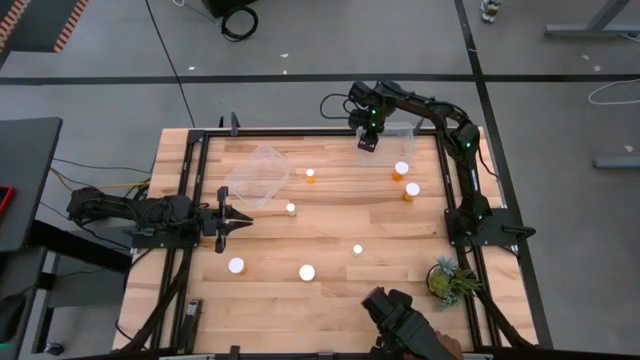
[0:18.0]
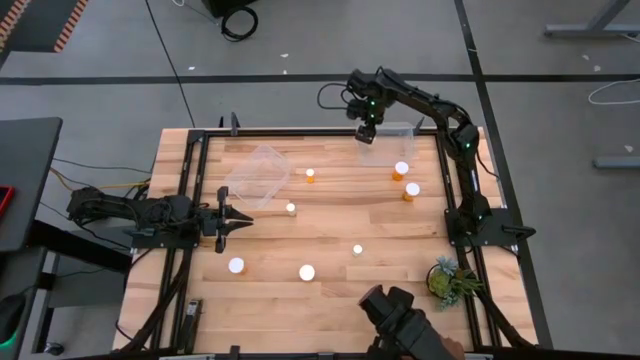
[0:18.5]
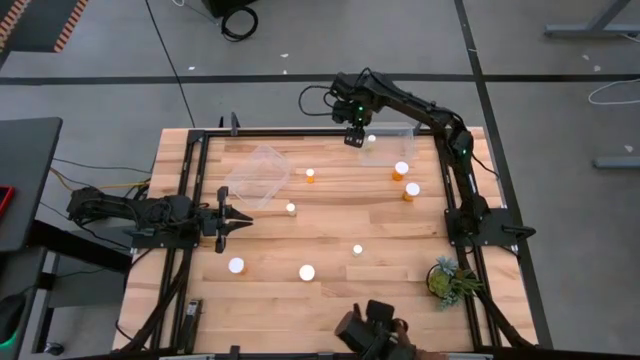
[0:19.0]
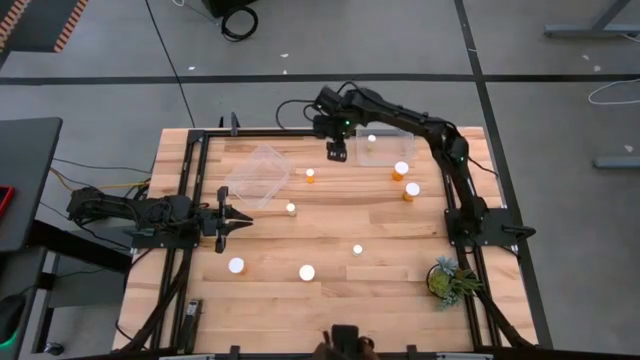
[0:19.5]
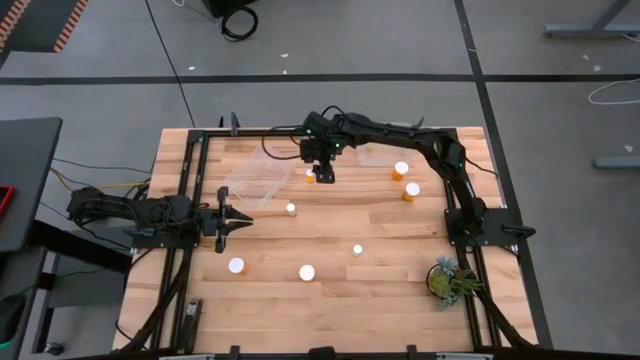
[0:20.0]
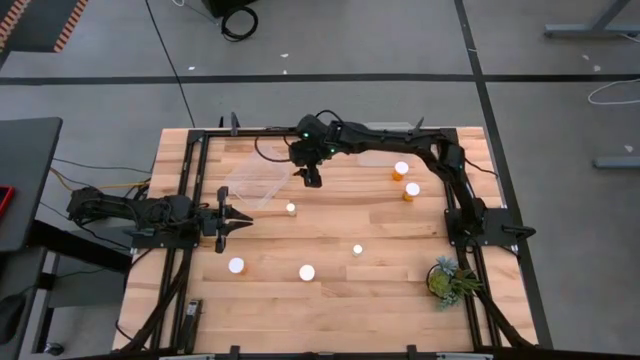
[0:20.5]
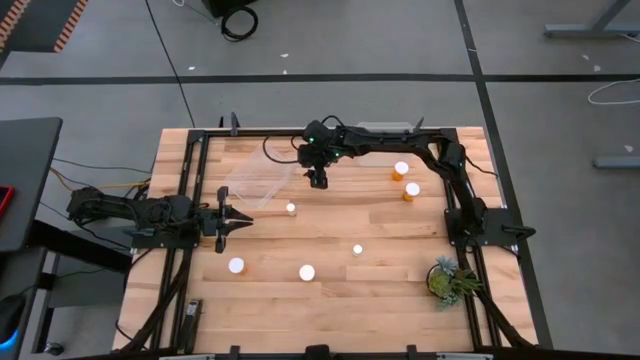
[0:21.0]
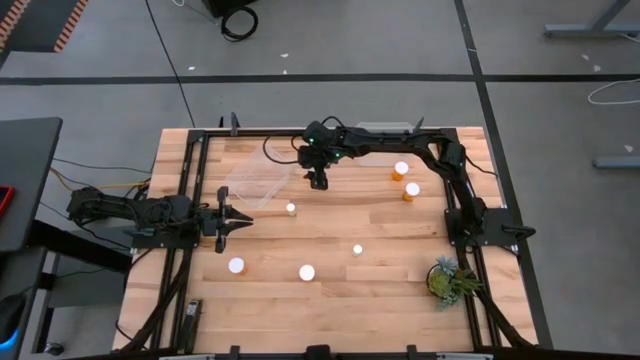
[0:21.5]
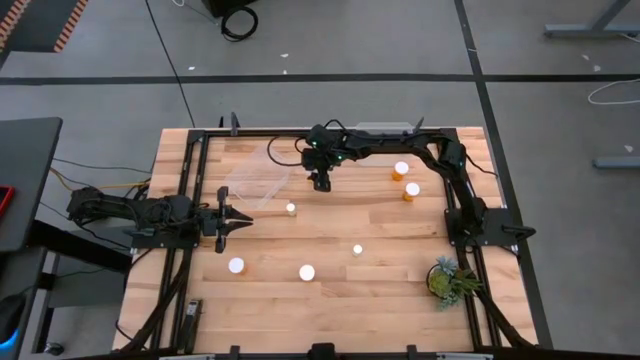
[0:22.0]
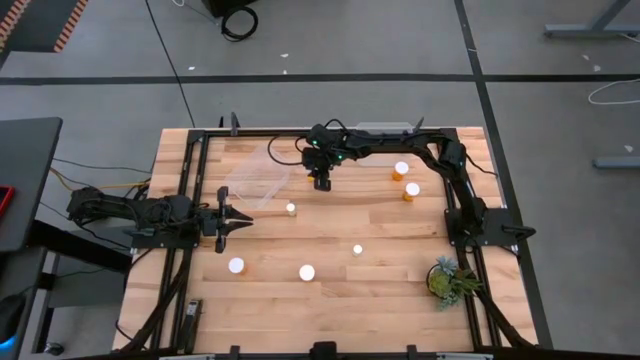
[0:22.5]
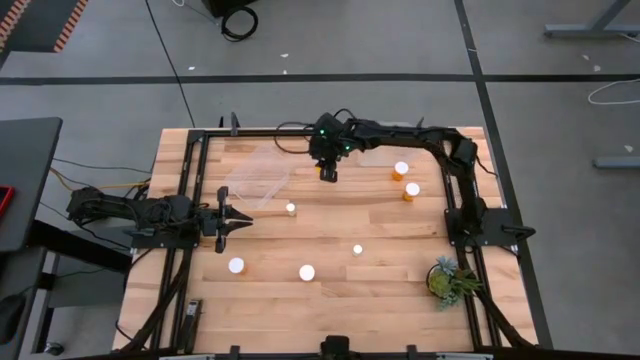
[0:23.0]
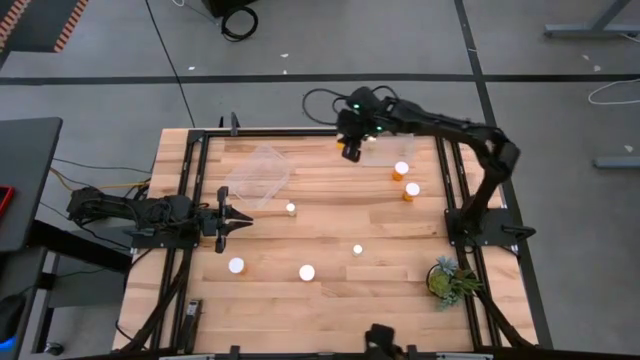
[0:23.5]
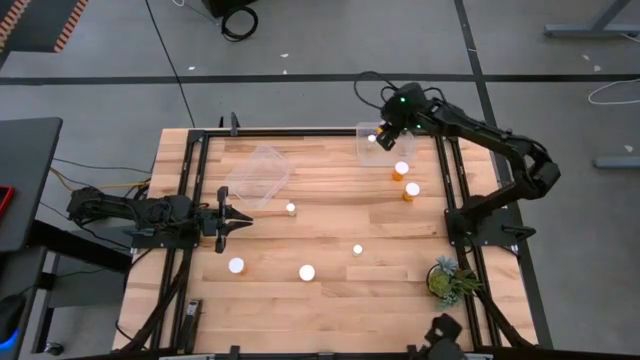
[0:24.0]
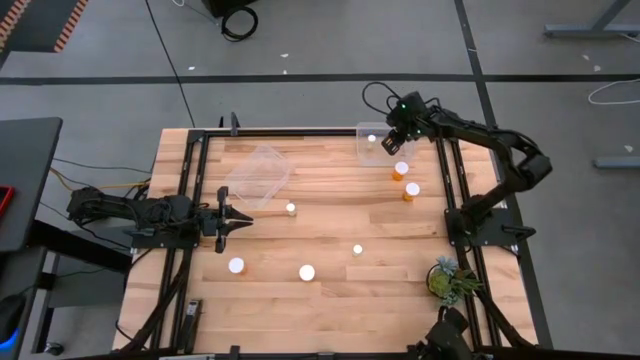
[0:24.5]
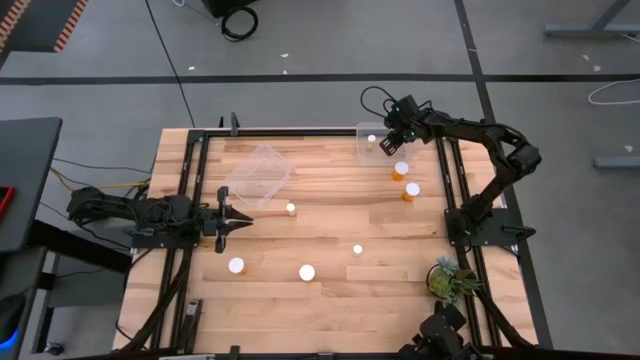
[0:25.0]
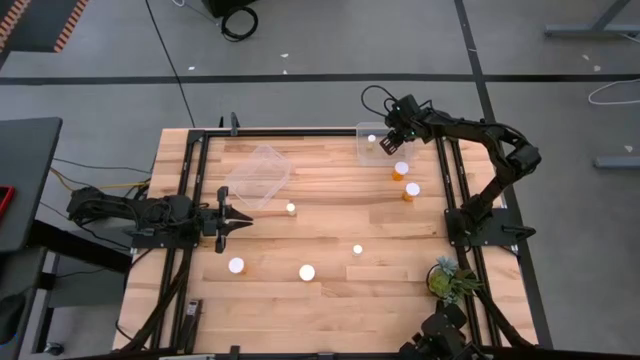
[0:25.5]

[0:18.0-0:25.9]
Task: Pick and place medicine bottles into bin by pill shape (circle, oval)
Put the slim orange pill bottle into the right transparent bin

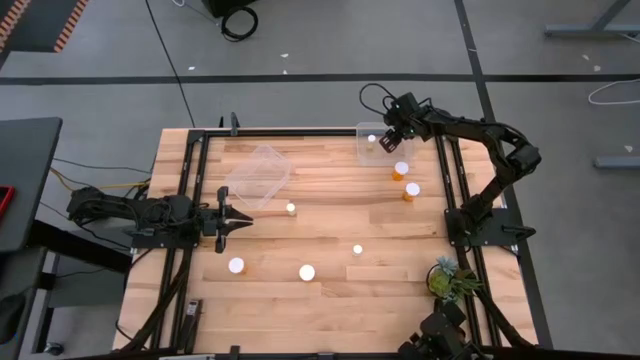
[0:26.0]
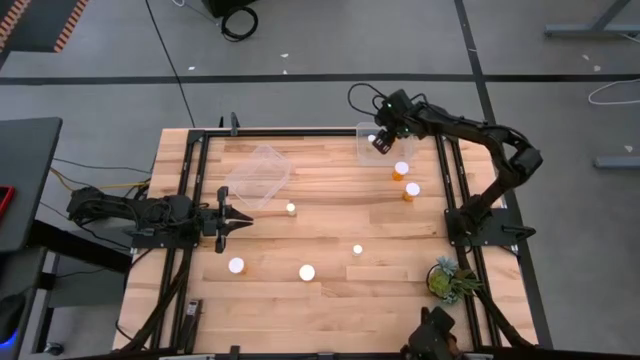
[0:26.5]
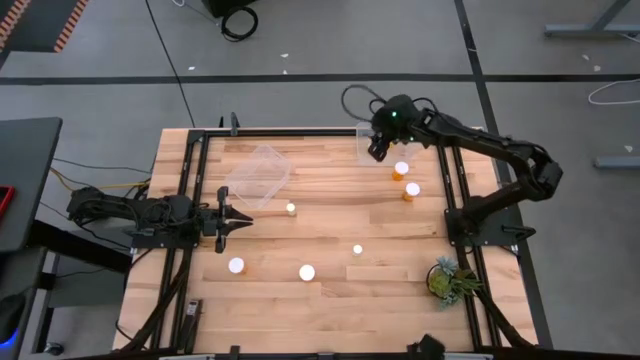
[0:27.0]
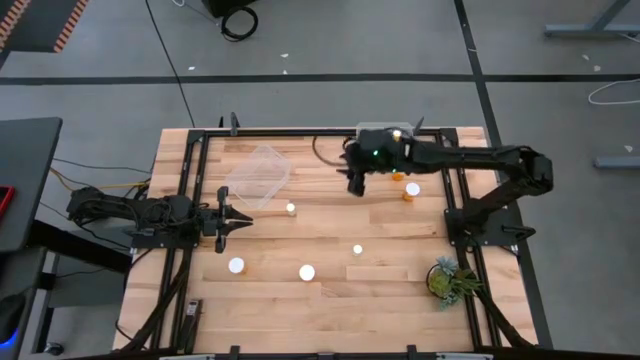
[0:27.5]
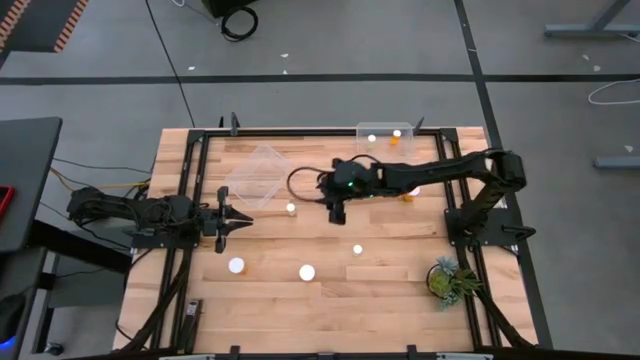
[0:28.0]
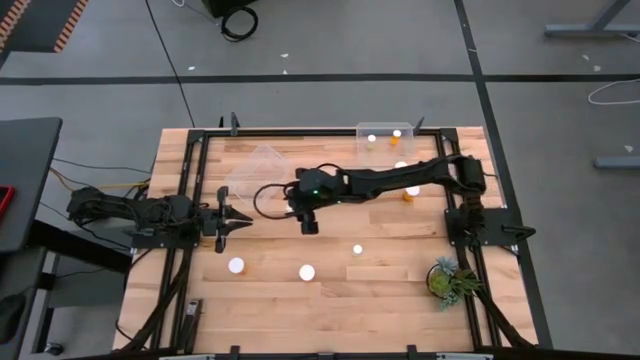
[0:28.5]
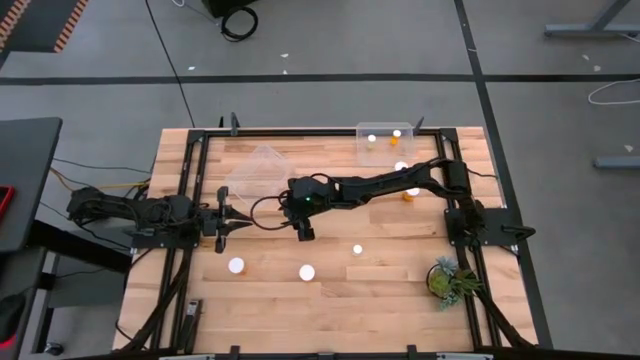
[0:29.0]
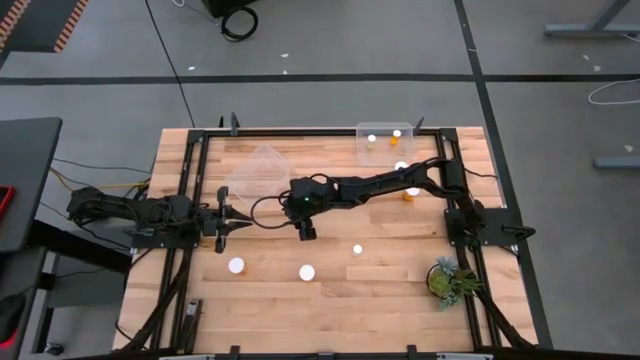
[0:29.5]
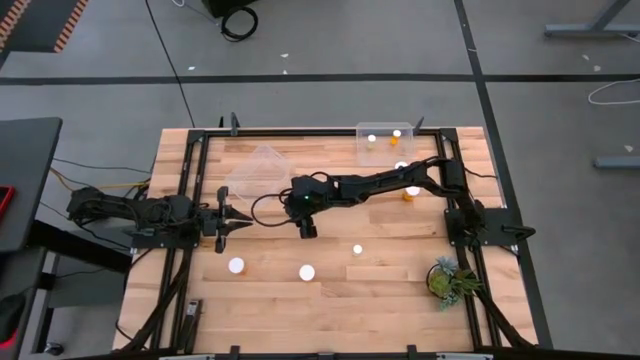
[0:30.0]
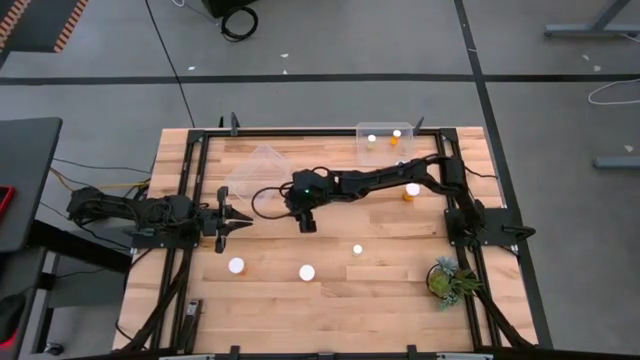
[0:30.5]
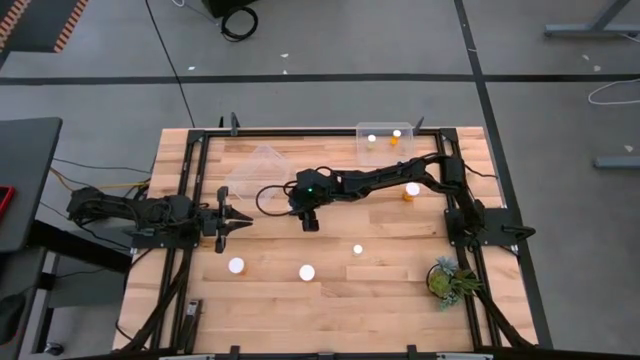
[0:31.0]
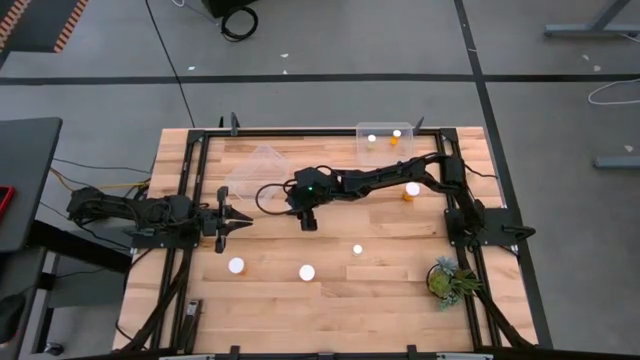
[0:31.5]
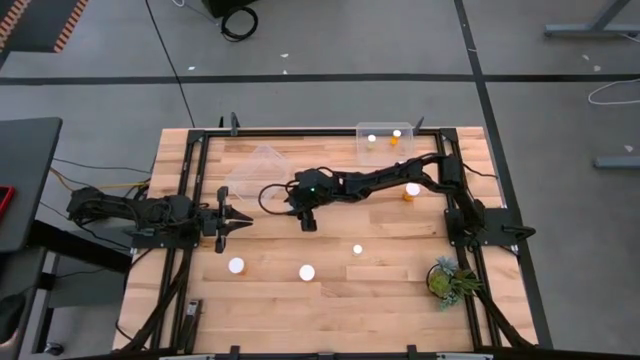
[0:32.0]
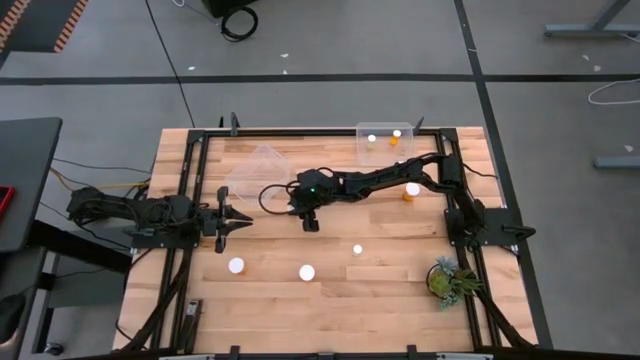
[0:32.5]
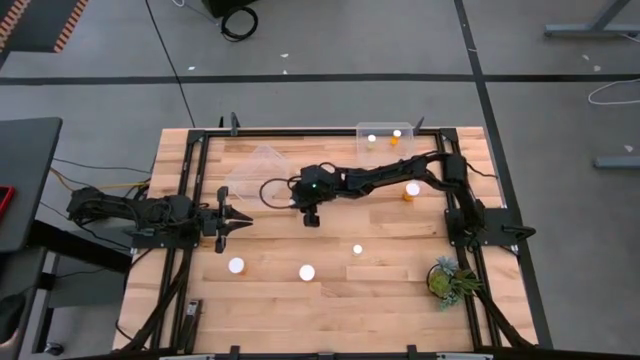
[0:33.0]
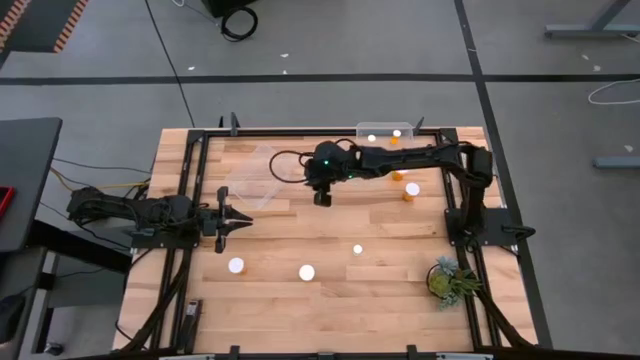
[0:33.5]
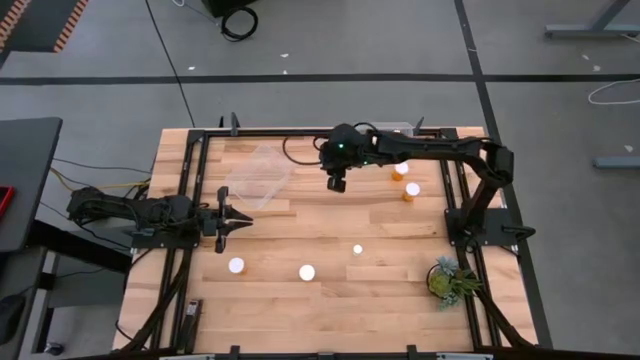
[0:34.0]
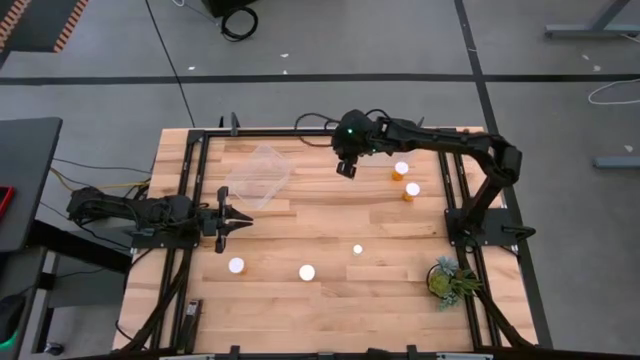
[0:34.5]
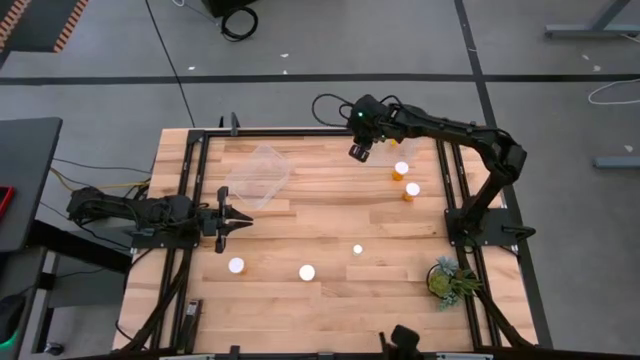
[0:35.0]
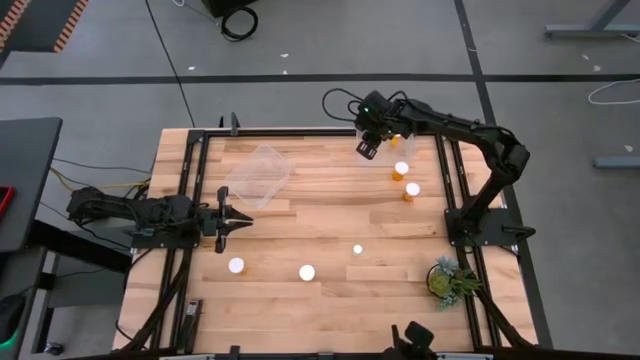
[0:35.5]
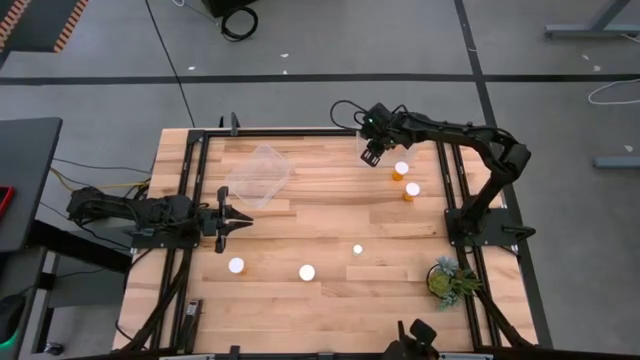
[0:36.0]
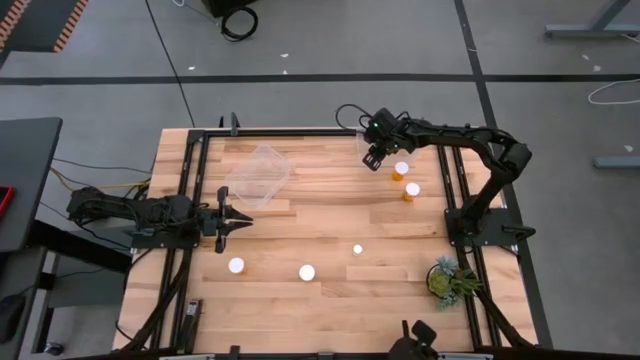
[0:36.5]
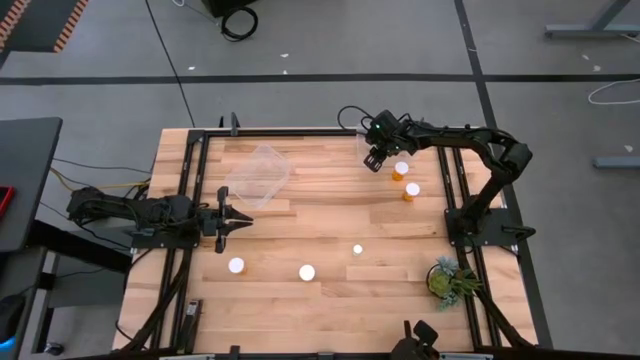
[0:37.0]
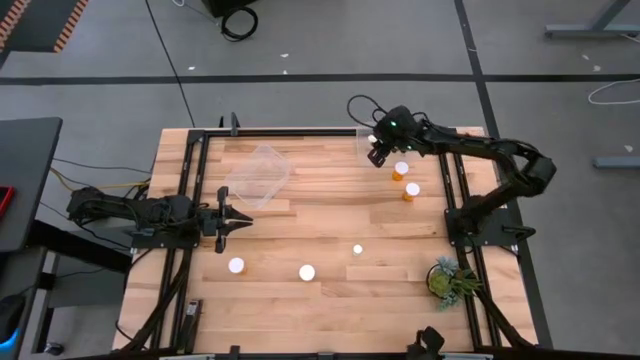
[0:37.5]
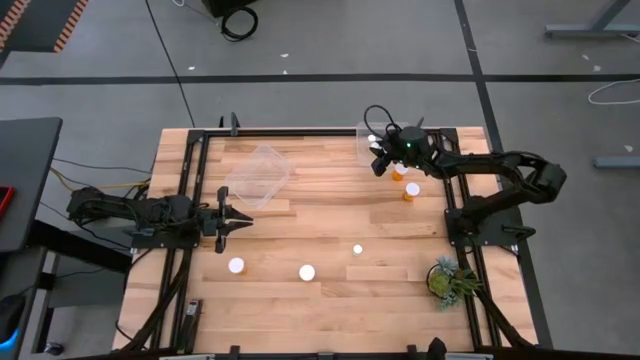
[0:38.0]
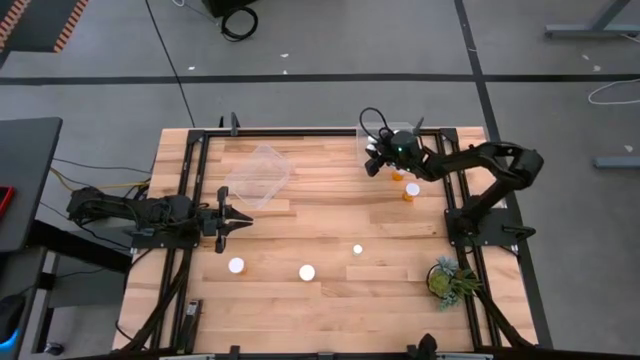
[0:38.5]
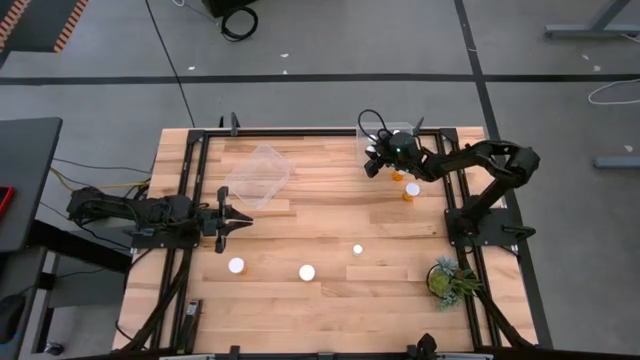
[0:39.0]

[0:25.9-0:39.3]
Put the left slim yellow pill bottle into the right transparent bin
